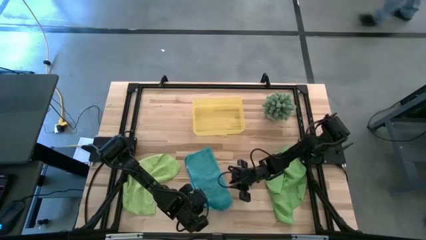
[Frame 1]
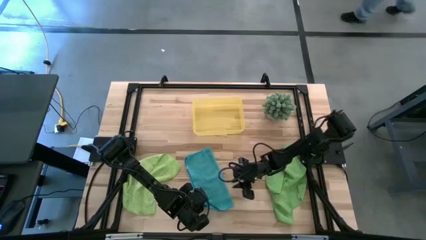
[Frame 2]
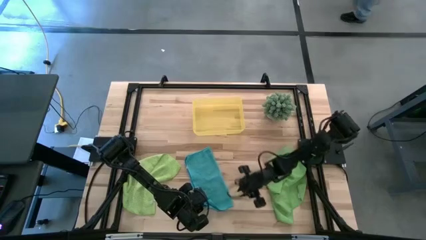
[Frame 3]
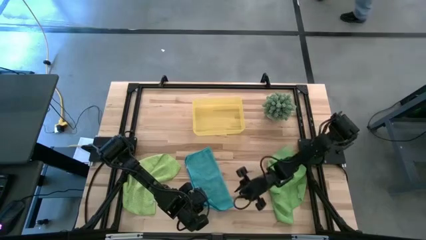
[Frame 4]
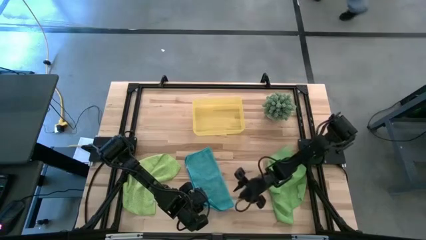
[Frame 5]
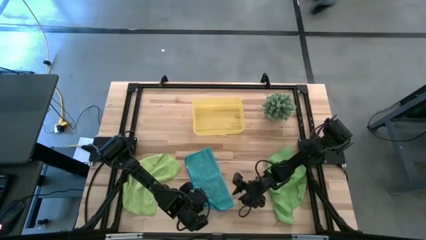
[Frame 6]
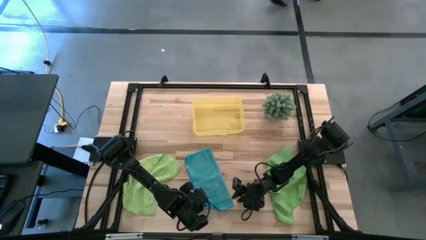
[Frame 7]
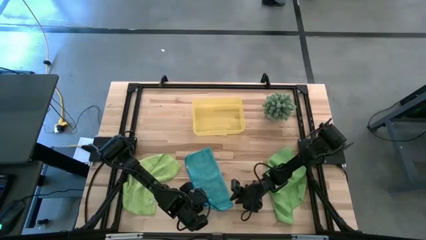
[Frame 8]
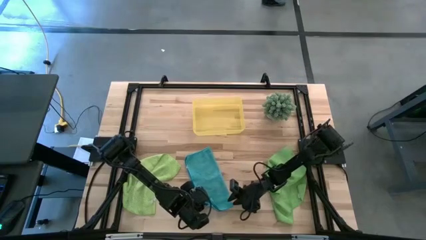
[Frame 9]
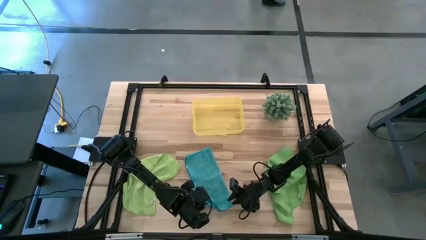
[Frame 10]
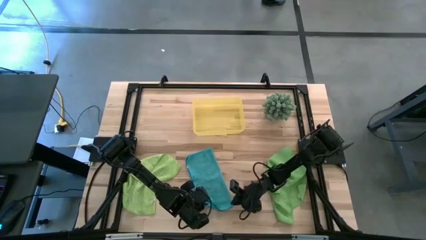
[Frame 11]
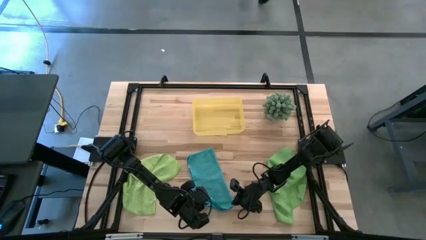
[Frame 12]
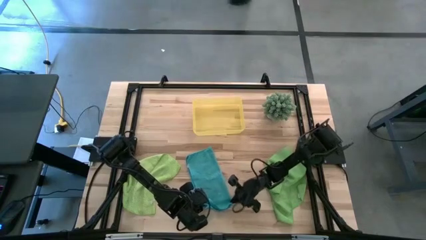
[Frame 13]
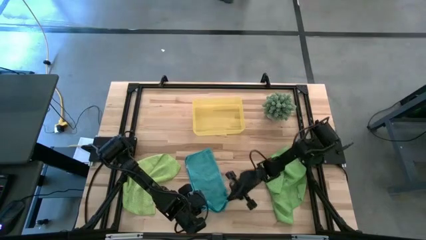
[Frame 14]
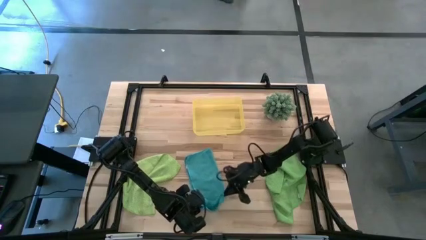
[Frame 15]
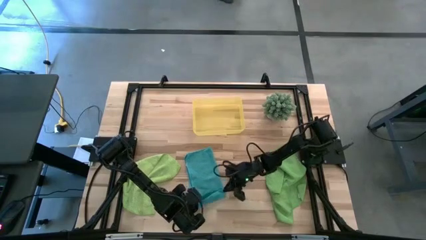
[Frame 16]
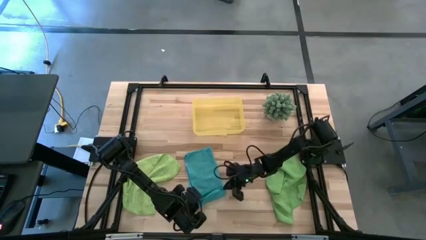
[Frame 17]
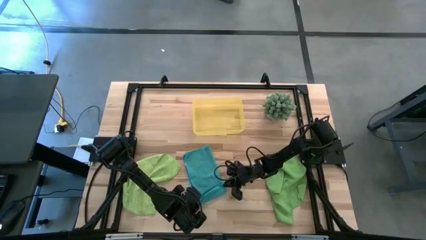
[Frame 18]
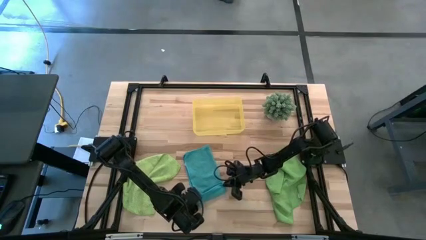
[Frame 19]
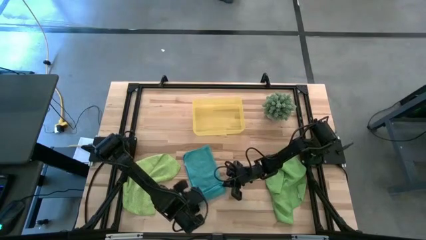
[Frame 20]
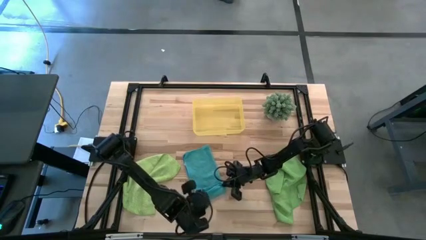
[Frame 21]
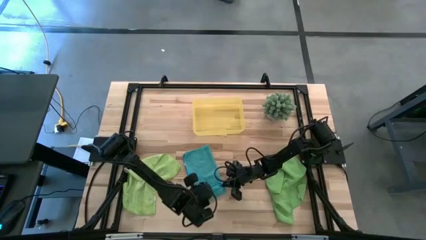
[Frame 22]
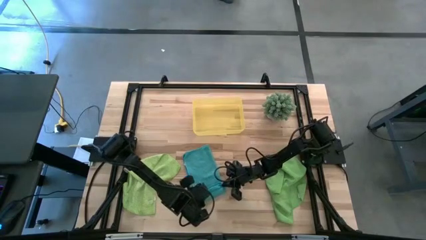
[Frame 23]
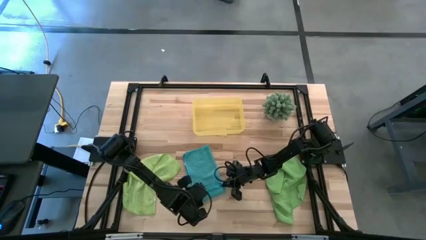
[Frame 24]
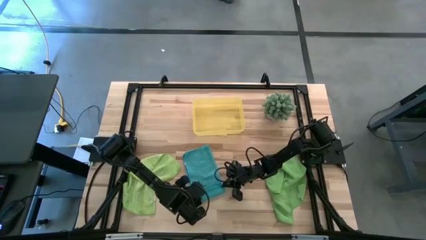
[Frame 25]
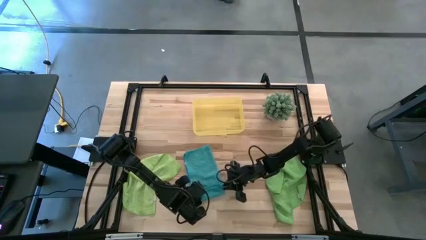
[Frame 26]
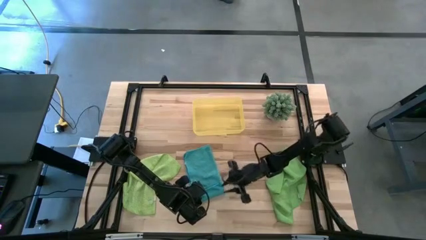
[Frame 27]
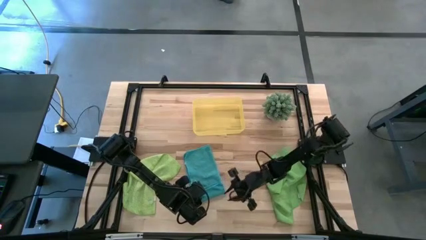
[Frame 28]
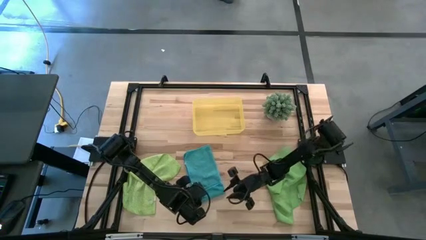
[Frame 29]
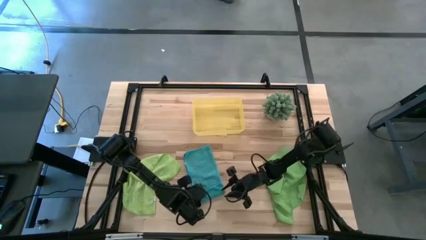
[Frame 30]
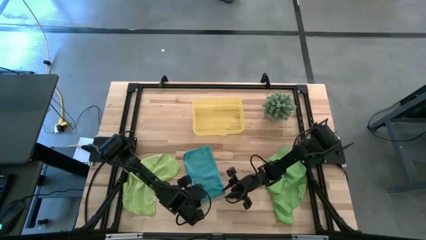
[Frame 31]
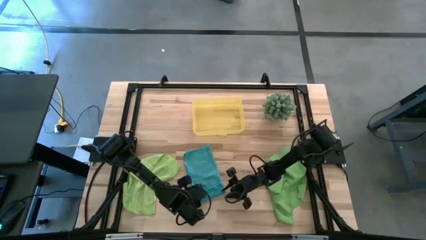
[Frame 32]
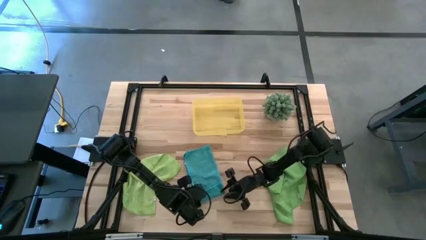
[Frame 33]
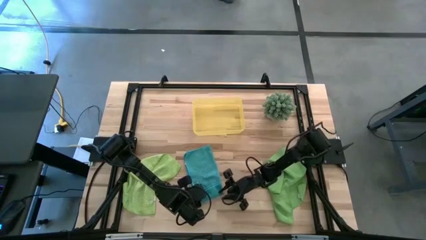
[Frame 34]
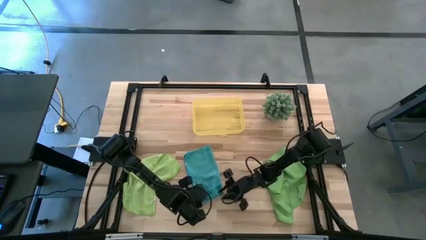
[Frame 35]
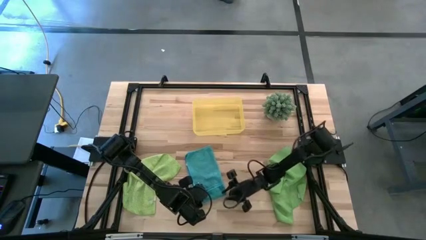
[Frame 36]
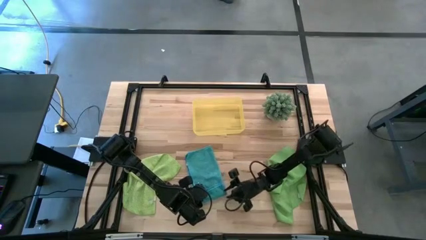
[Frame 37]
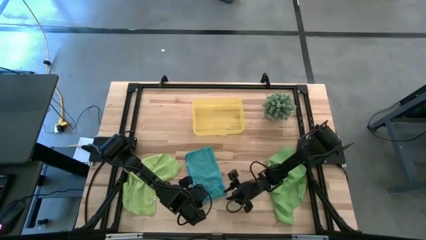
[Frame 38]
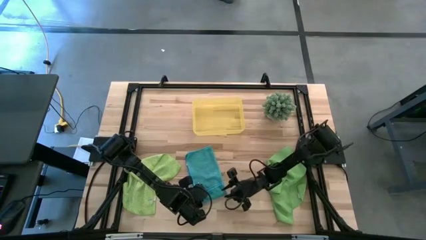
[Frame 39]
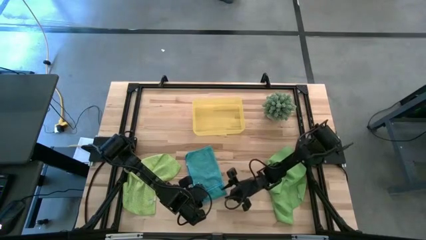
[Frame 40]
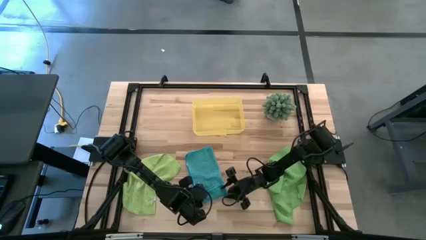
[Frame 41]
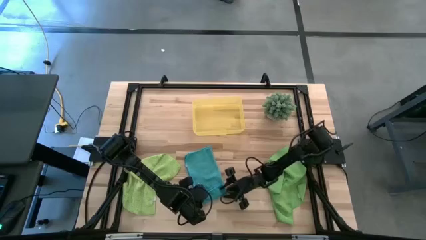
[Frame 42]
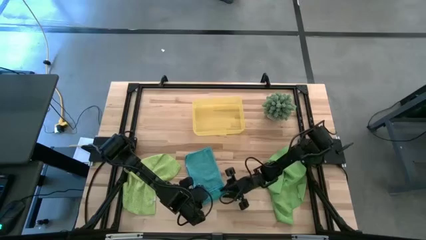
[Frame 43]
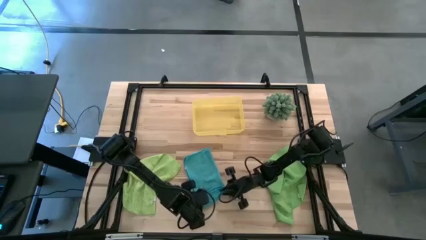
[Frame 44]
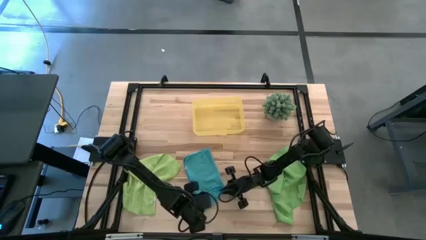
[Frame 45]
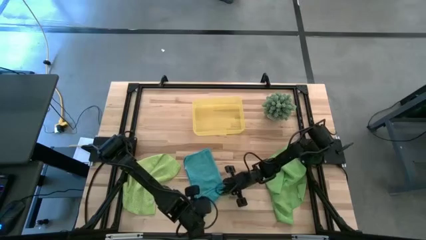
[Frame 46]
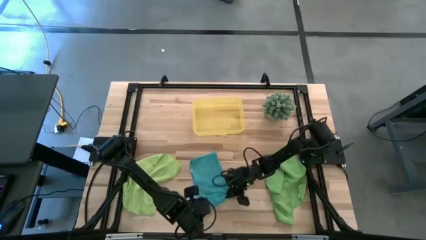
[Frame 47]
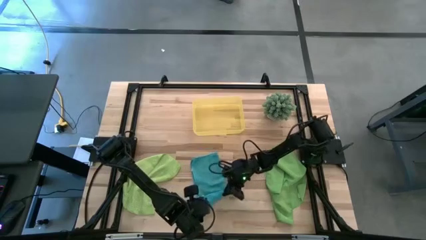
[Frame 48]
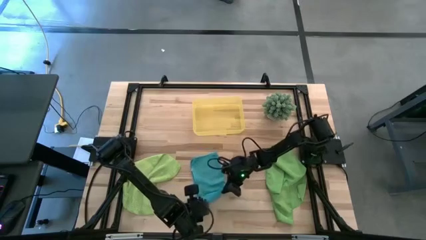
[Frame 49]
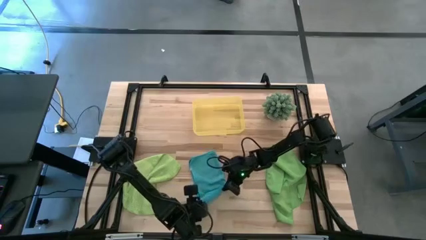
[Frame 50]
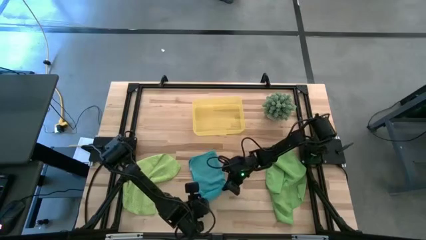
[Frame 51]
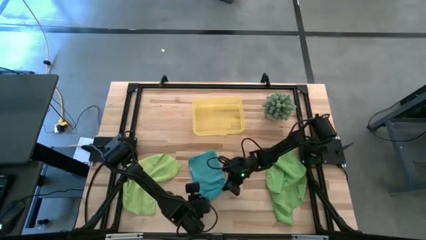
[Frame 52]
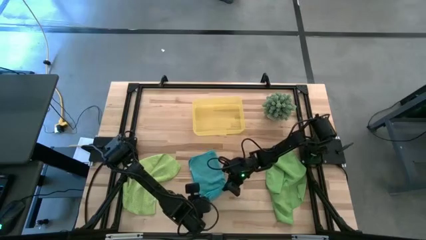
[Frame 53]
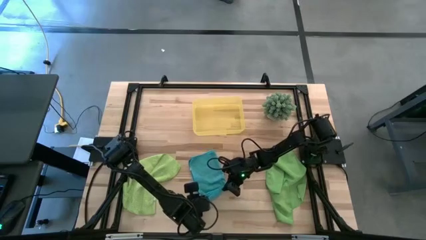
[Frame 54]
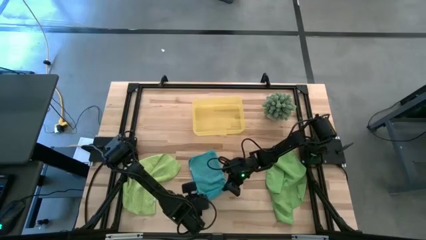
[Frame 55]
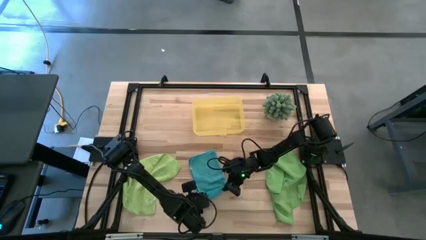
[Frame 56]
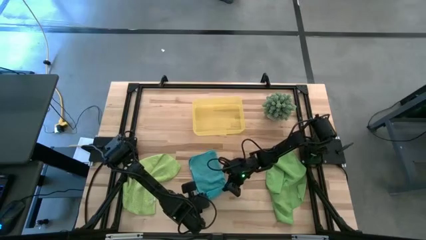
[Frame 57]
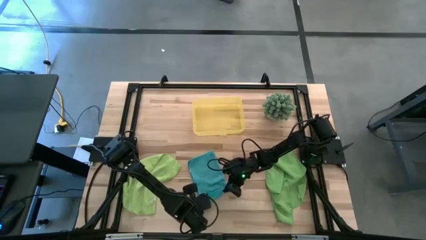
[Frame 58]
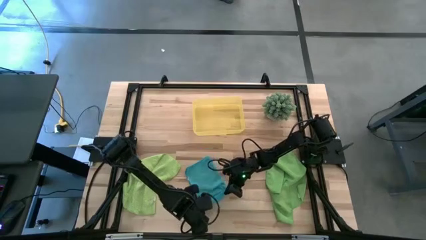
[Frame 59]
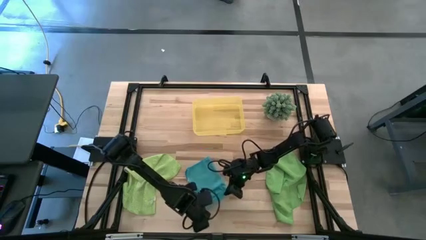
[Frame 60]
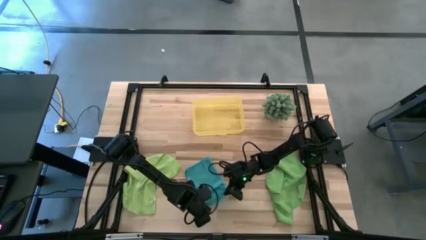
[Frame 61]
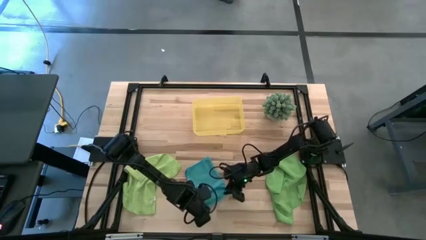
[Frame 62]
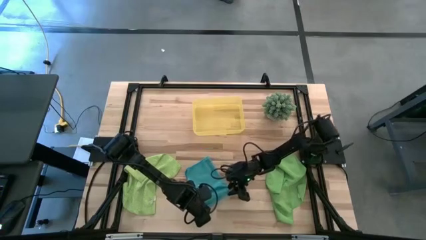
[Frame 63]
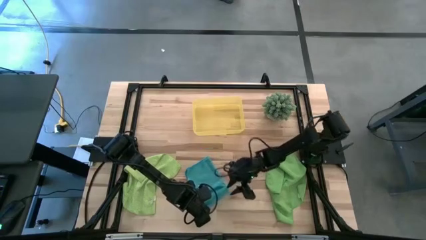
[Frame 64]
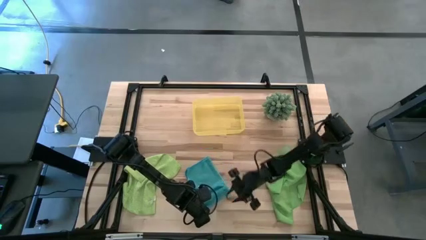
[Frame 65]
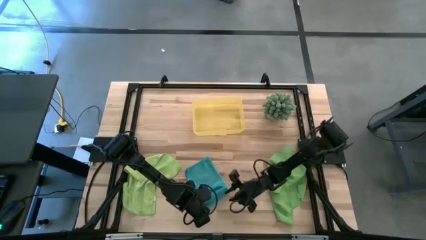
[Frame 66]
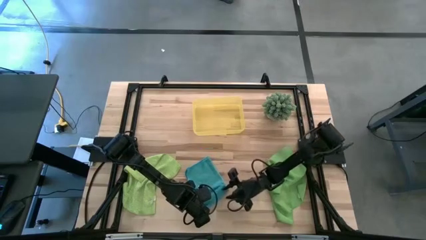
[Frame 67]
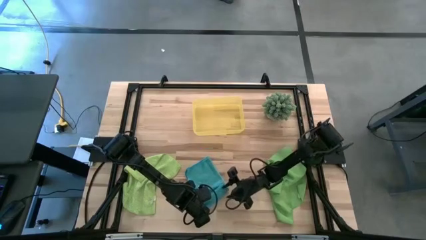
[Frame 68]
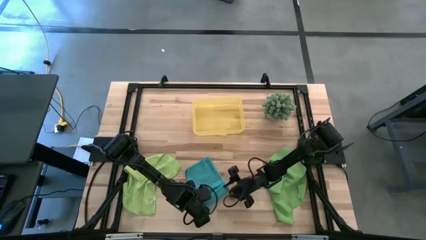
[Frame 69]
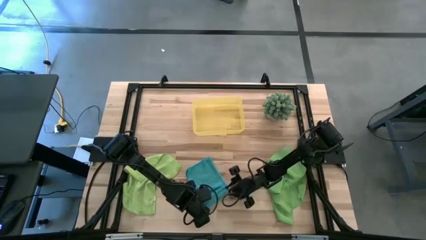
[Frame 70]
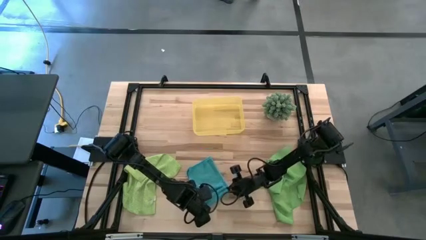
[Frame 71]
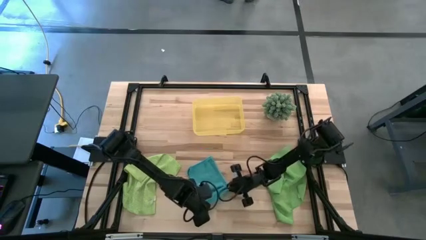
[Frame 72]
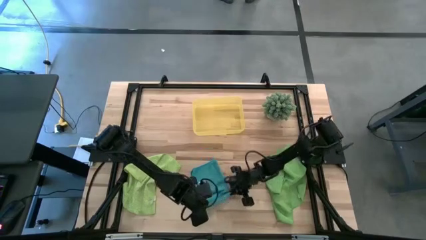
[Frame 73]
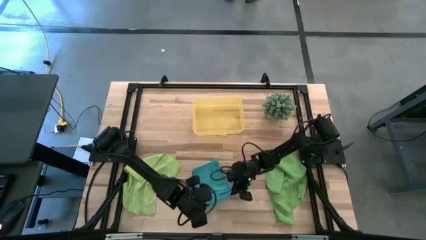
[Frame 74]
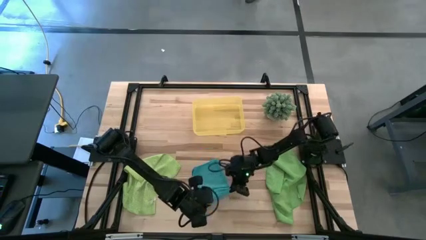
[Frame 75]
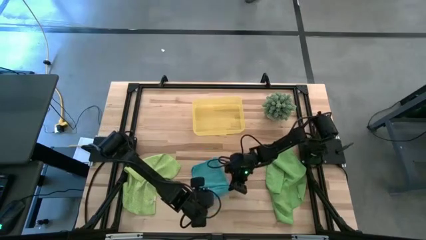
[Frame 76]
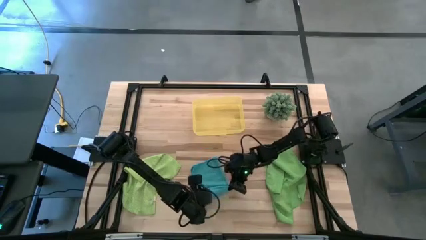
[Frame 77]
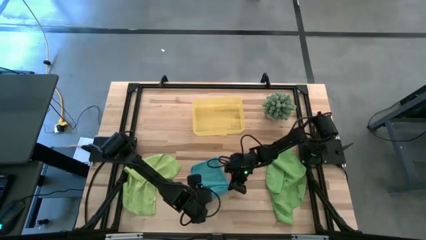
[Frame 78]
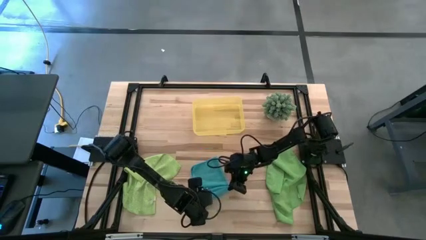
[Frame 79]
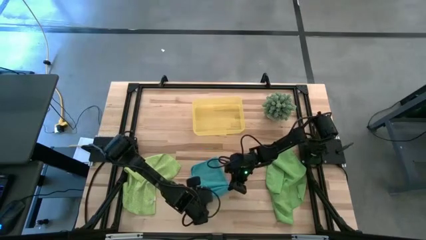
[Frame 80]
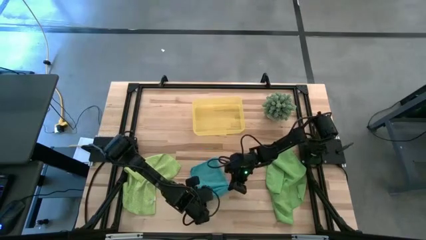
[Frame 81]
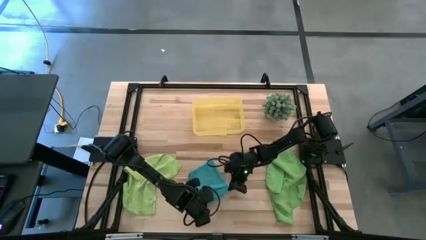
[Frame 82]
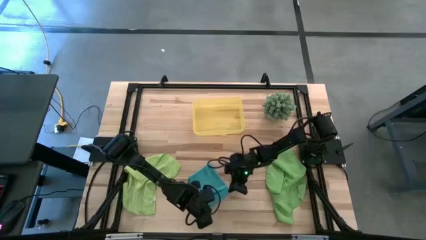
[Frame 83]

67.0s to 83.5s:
Task: Roll microfiber towels into tight, uniform cylinder then place into a basket
Roll the blue microfiber cloth
